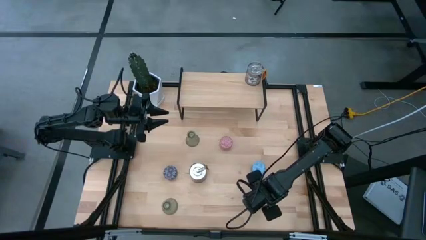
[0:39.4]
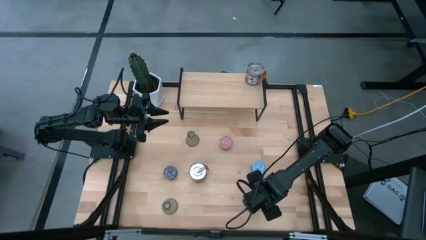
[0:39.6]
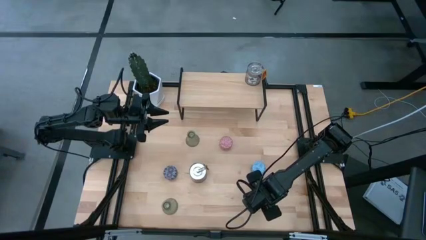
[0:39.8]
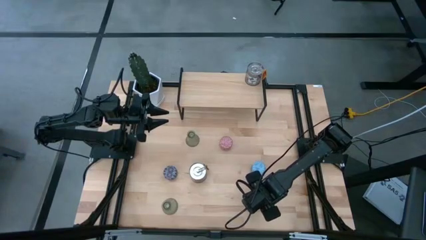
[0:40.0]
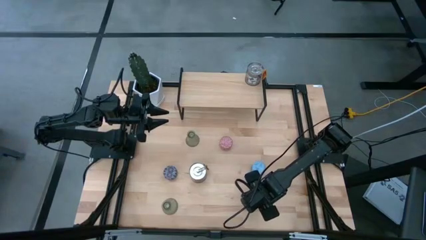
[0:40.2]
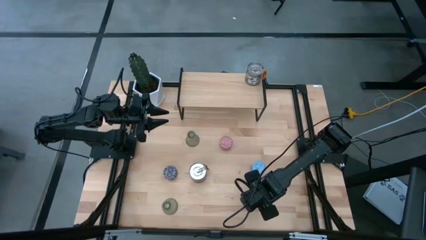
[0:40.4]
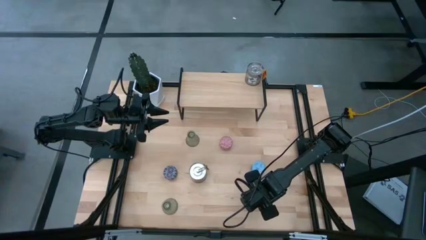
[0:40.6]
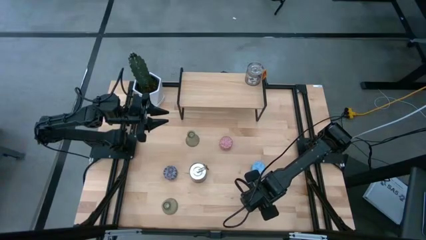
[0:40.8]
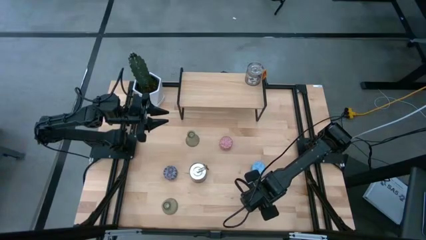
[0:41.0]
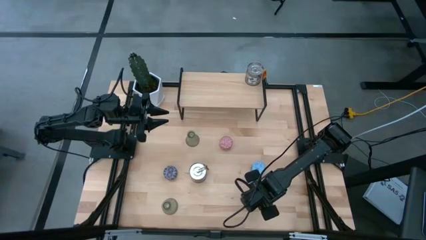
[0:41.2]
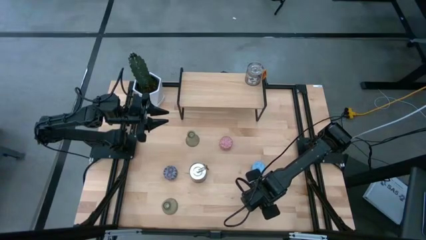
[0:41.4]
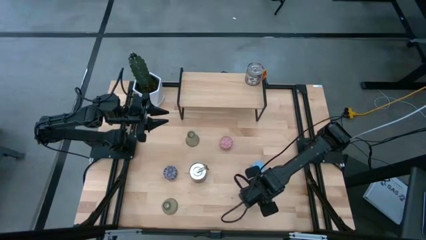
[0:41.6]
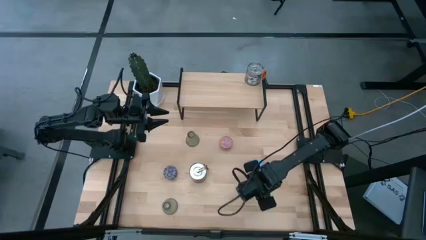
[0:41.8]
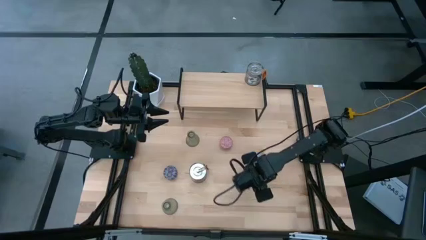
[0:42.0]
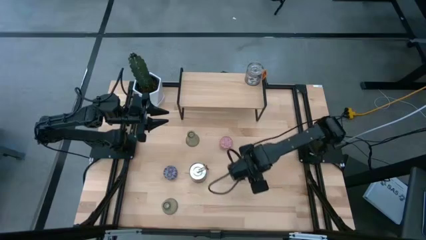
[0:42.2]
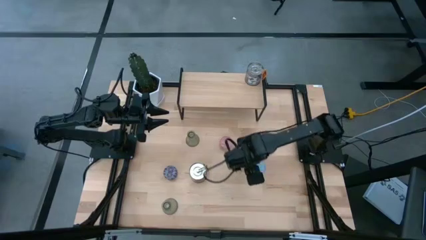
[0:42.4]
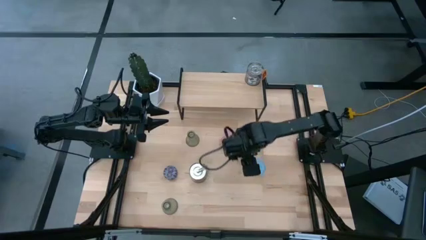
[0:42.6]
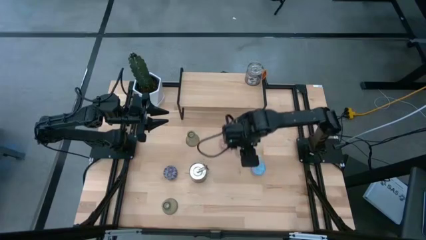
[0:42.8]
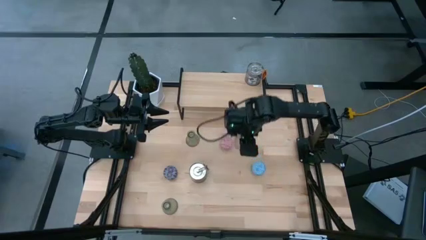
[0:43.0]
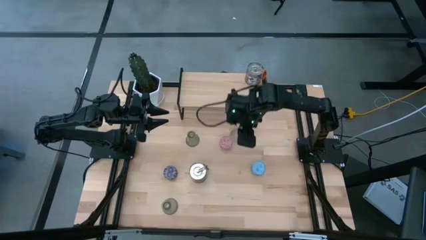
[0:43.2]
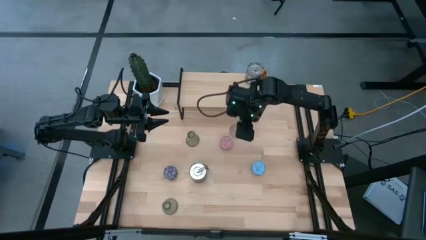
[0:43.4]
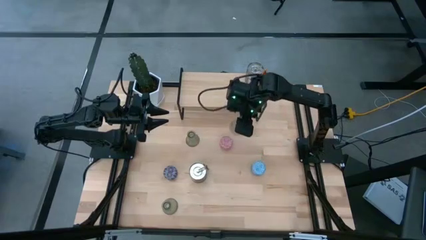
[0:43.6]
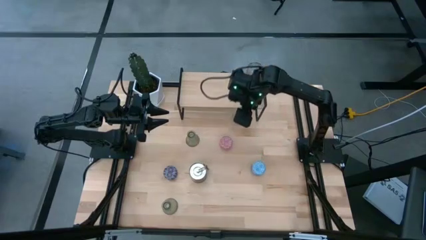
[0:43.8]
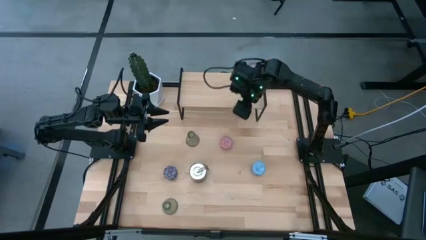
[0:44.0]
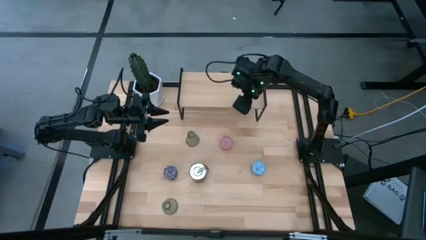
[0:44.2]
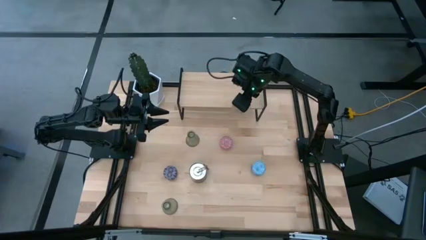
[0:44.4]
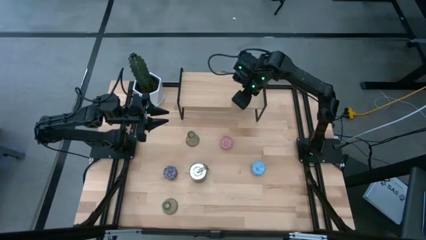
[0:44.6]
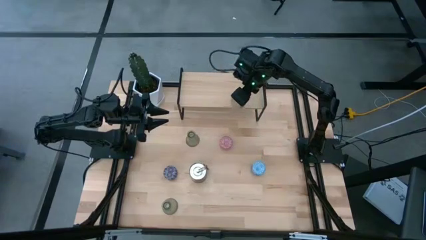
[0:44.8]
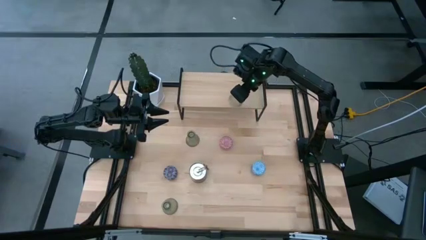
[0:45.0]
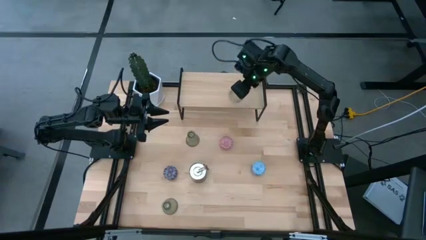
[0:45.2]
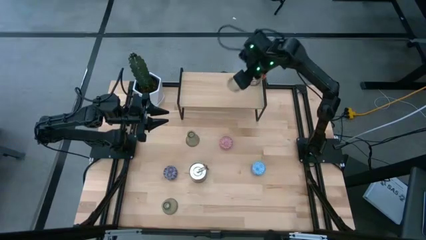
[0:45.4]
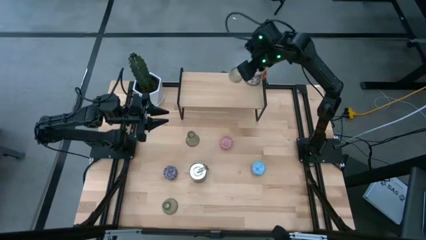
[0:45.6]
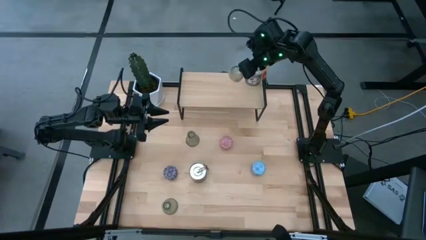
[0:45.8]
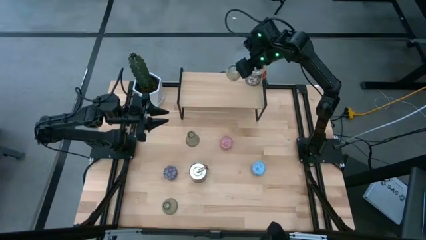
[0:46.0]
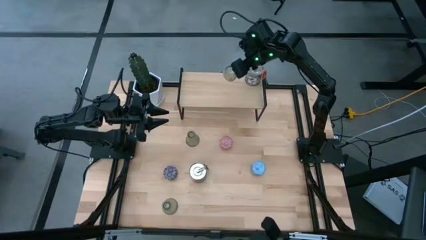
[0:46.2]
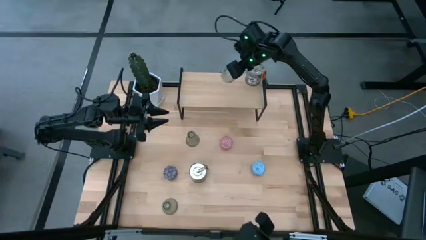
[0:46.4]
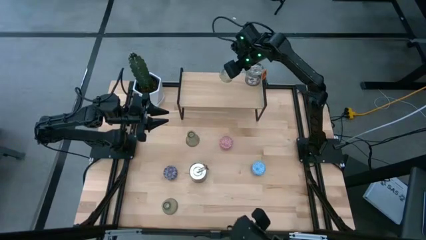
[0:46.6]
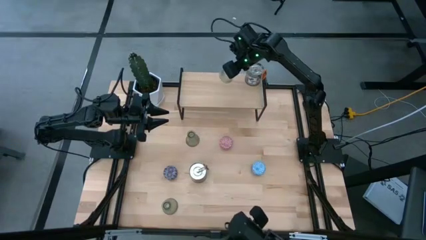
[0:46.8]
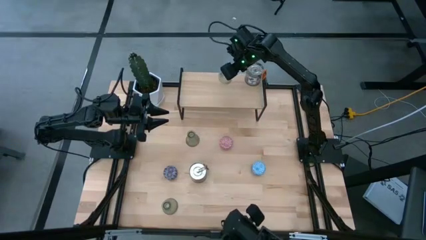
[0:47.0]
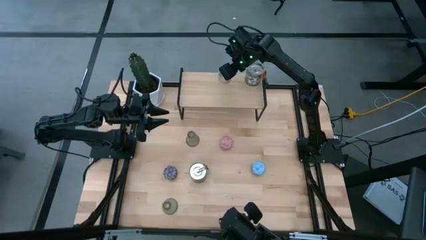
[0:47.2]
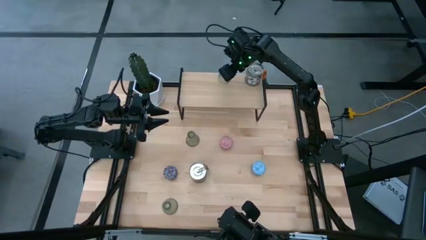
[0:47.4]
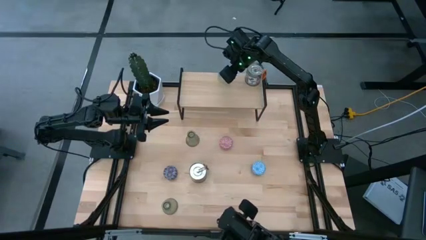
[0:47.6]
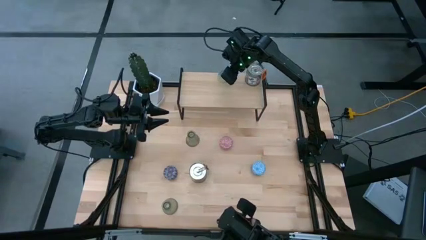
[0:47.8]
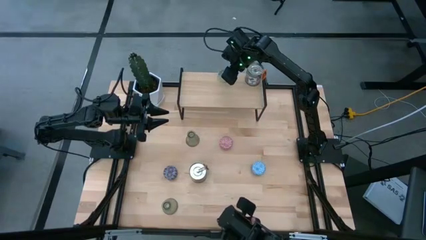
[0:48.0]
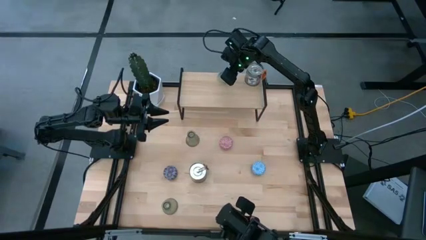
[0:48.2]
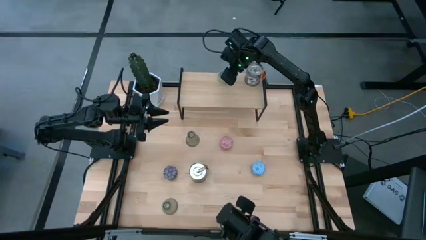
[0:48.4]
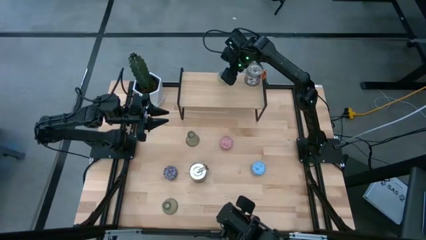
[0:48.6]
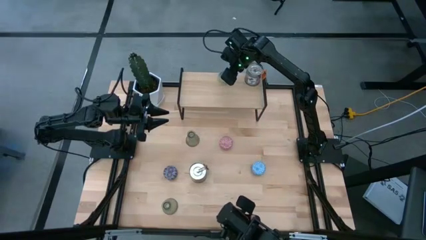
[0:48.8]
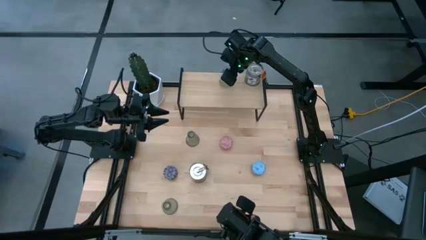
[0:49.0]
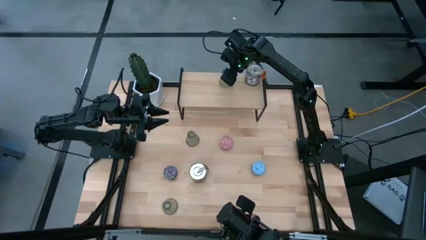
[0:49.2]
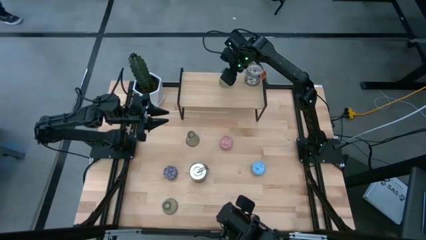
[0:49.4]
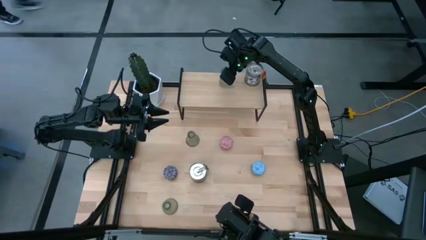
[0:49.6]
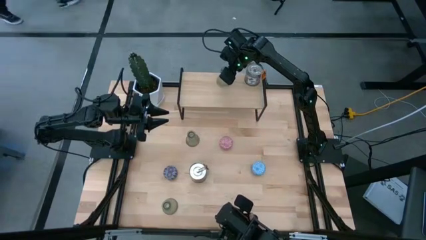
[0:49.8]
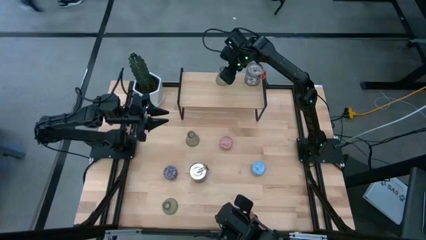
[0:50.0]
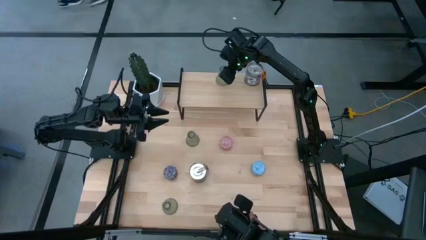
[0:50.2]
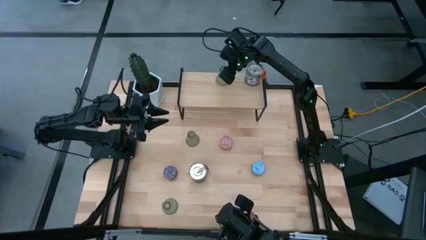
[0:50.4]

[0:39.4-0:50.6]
Task: Pick & Place candle stick holders
Put the right green glass candle holder on the shelf
